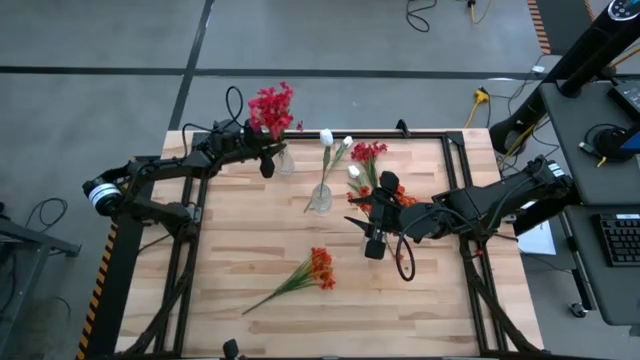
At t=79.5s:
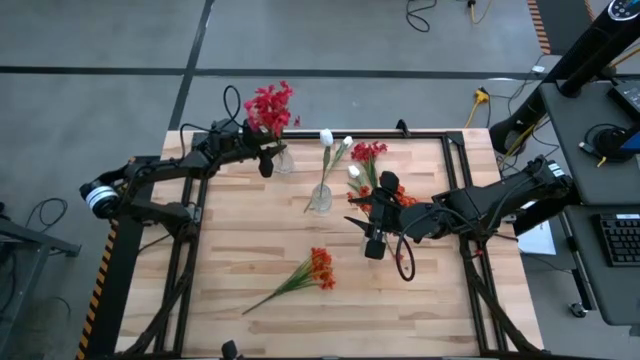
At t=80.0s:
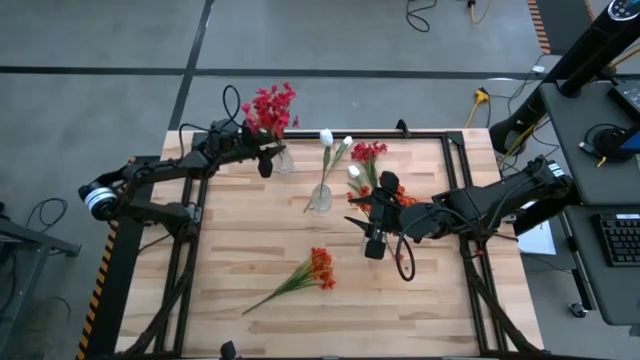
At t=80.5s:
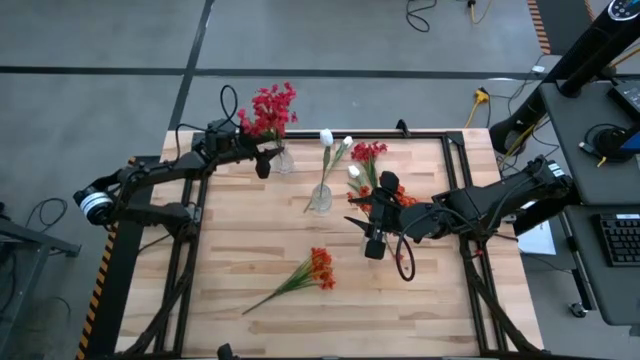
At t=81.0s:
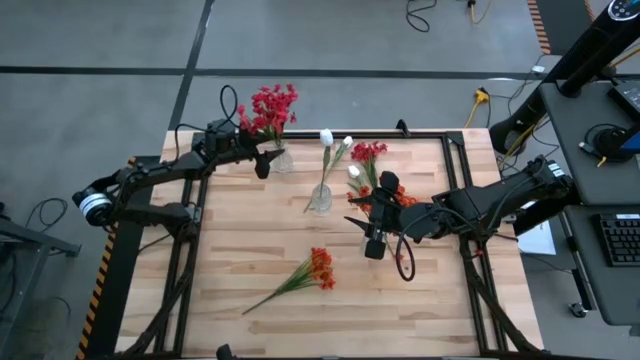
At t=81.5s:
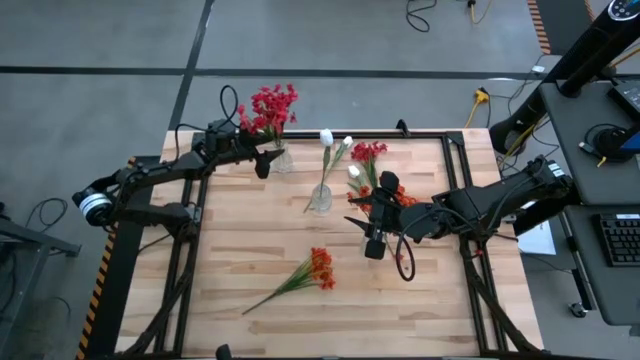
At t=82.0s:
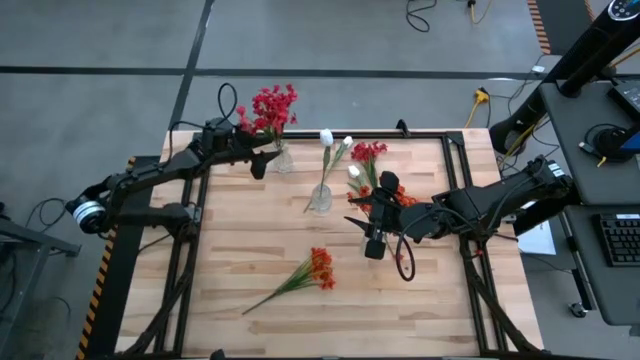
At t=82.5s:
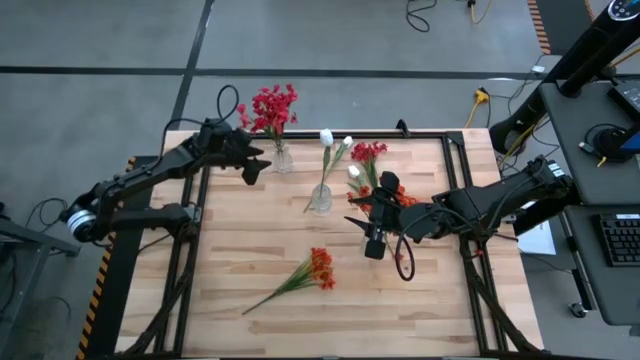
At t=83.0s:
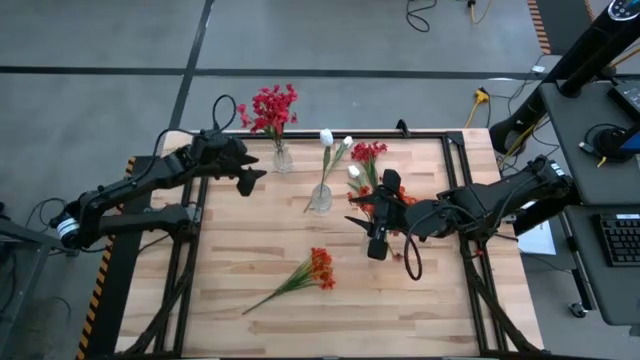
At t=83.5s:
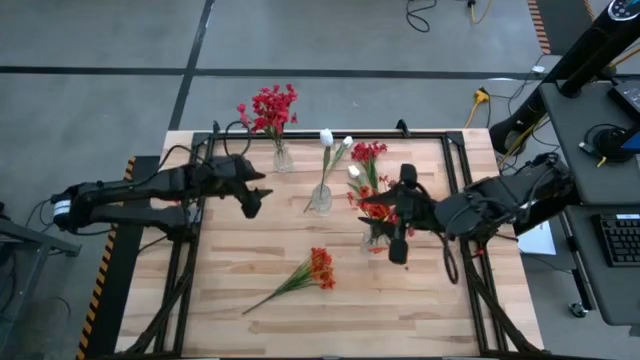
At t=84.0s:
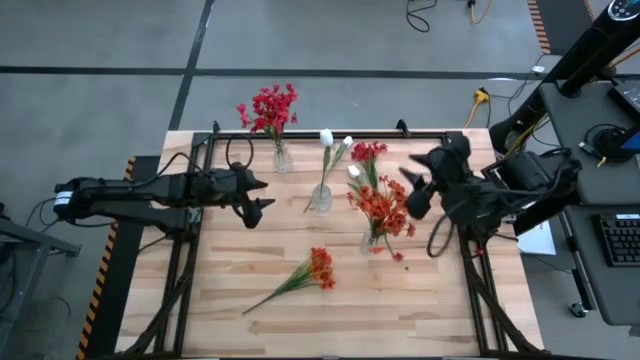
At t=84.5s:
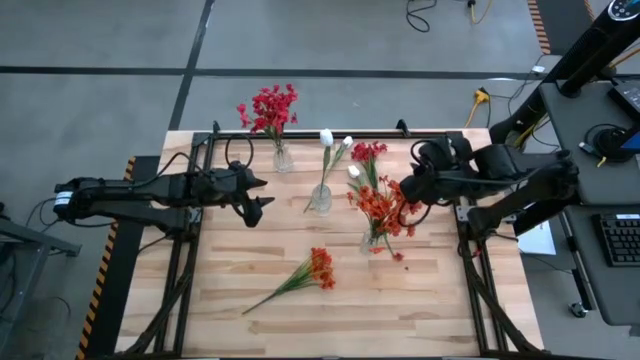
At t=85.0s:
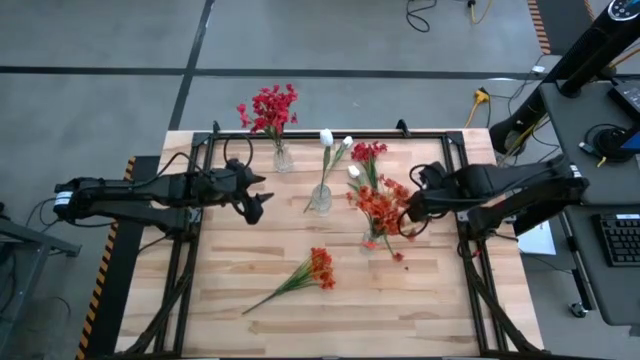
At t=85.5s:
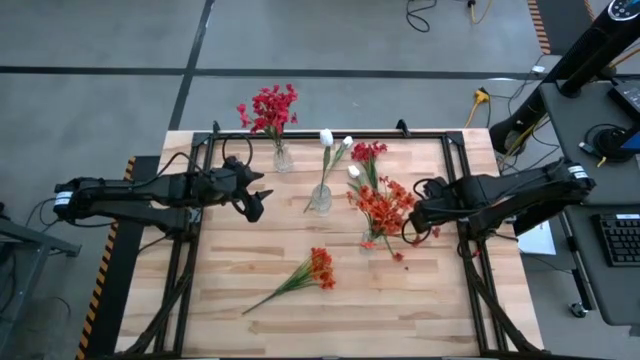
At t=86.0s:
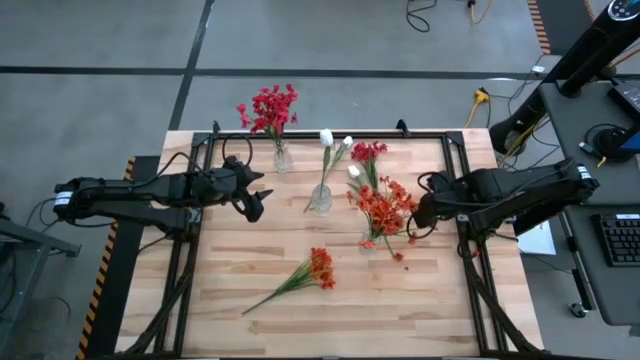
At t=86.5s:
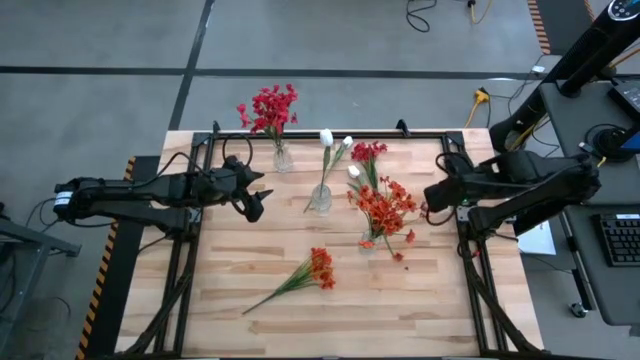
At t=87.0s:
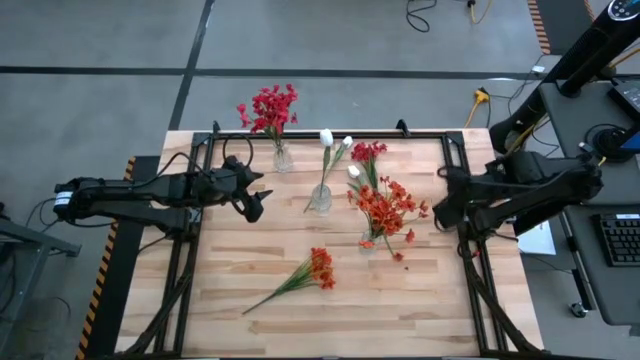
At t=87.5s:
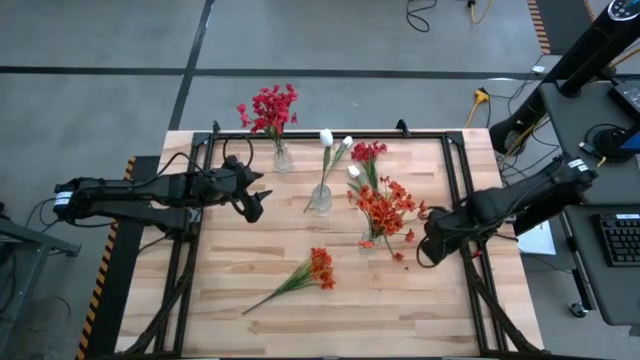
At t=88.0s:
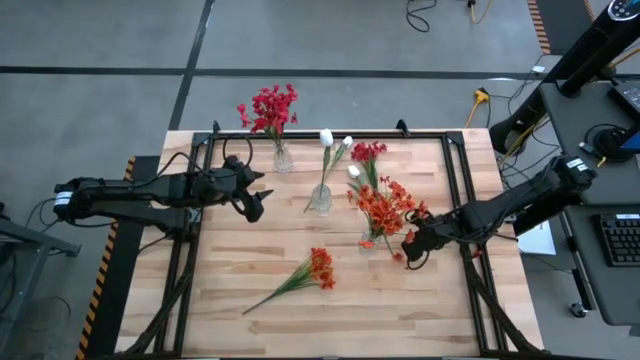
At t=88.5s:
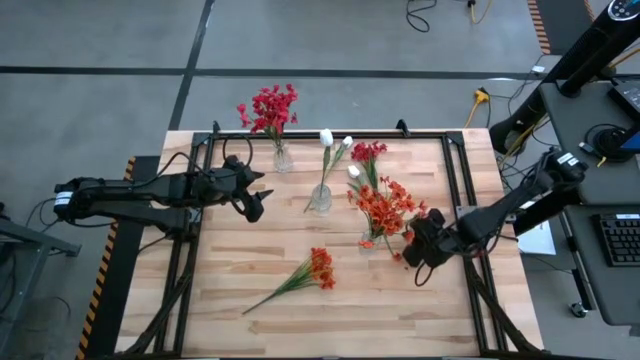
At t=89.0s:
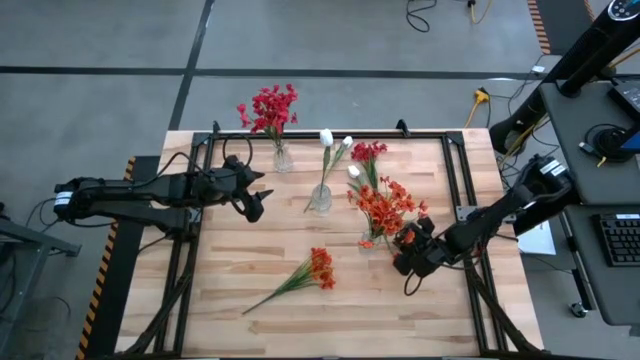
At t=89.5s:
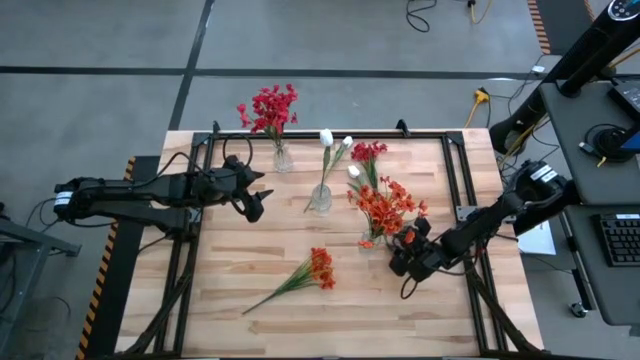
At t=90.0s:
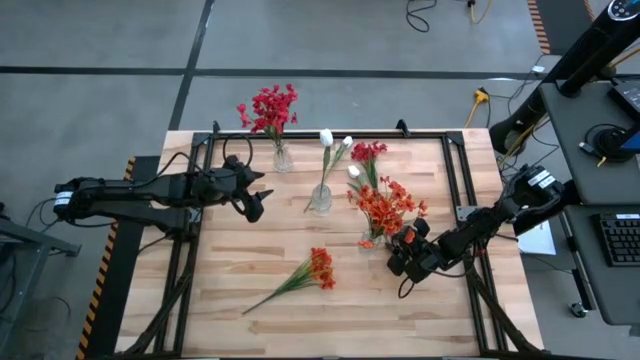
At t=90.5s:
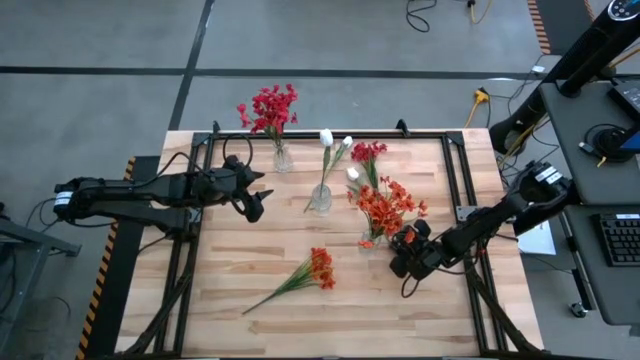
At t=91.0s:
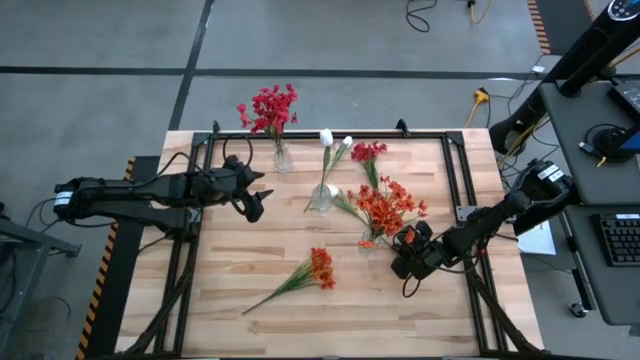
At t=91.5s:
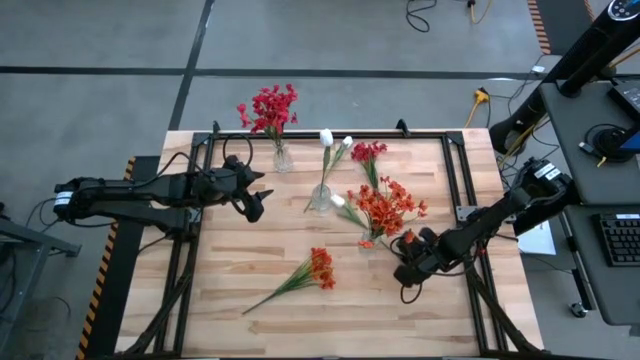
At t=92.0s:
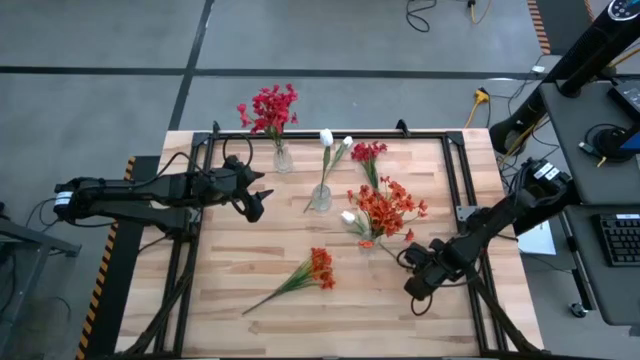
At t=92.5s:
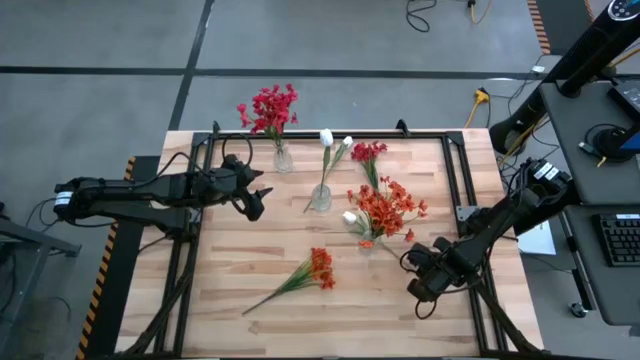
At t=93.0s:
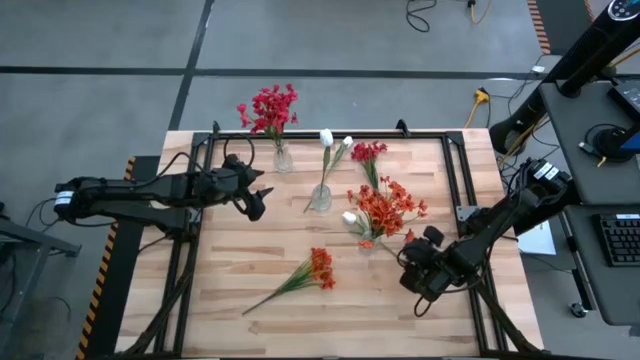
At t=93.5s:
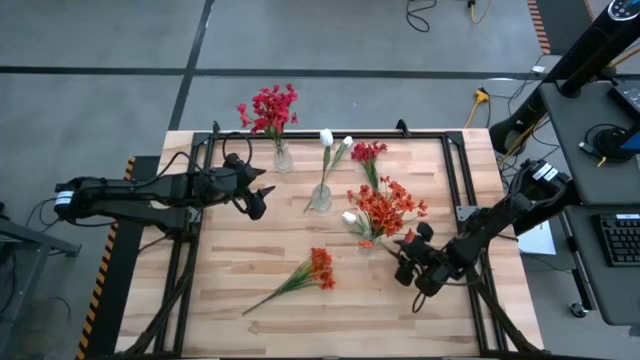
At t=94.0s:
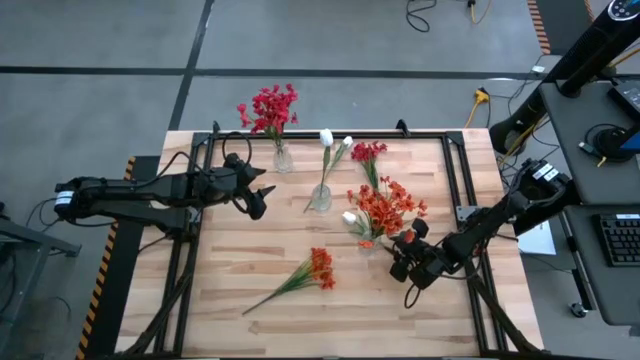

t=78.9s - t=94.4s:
Task: Sort flowers into vase by color
Put the right white tulip flower into the center transparent glass vase

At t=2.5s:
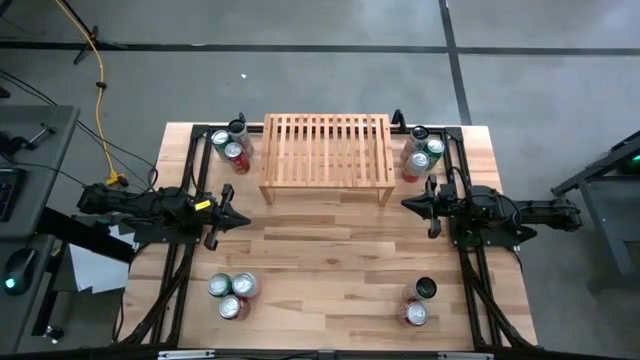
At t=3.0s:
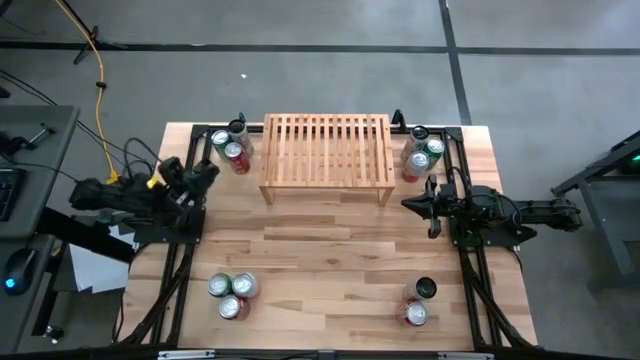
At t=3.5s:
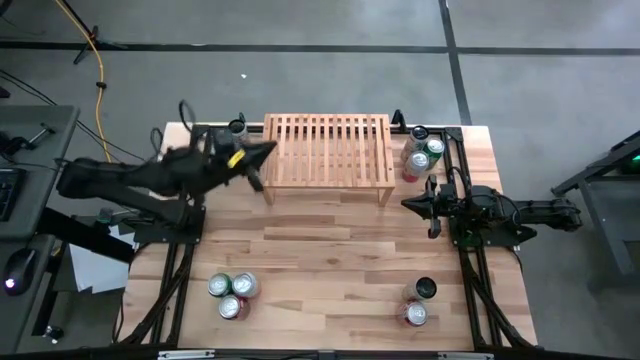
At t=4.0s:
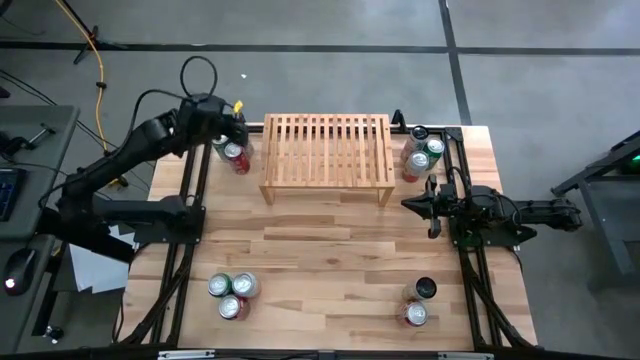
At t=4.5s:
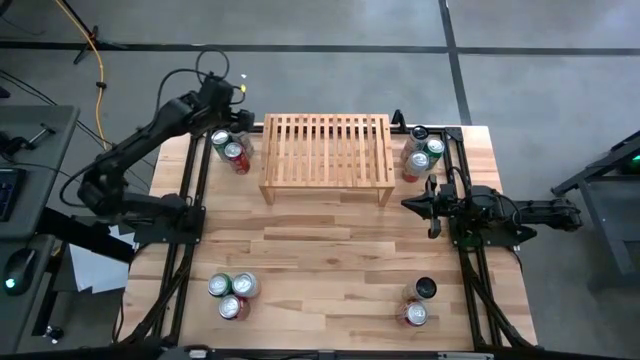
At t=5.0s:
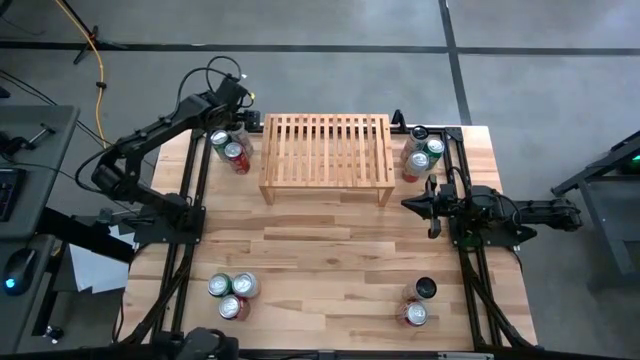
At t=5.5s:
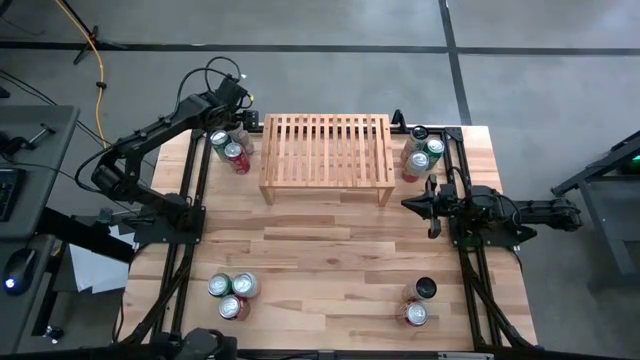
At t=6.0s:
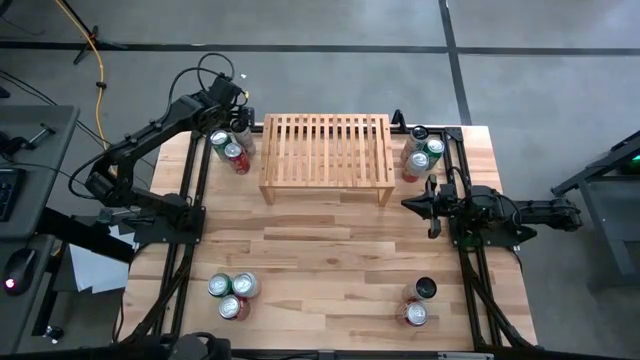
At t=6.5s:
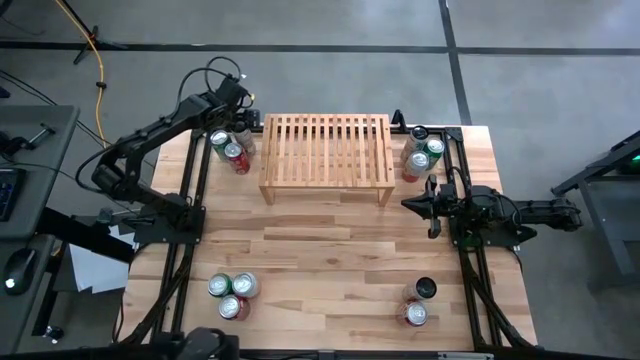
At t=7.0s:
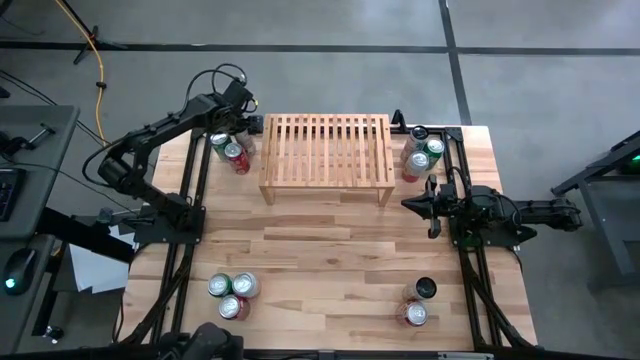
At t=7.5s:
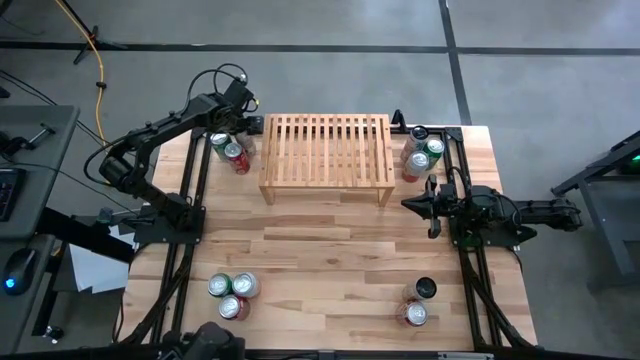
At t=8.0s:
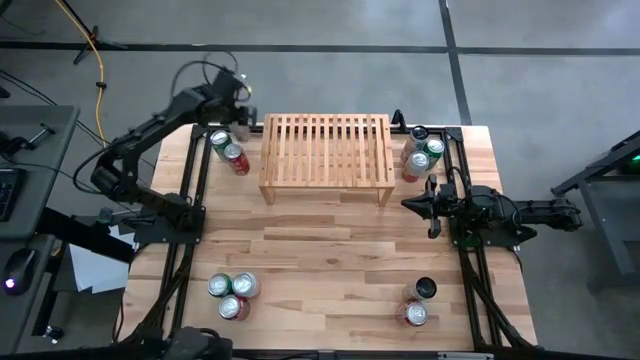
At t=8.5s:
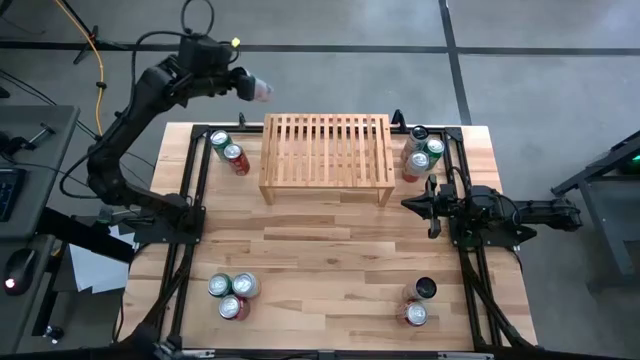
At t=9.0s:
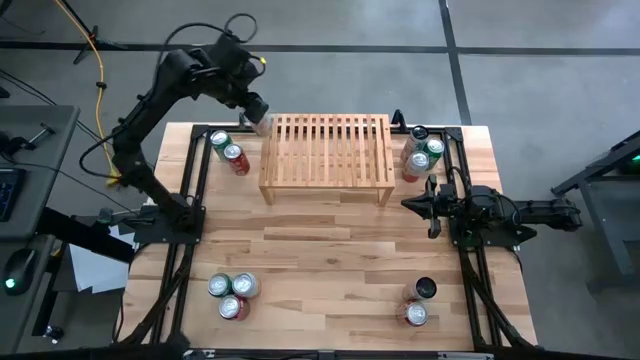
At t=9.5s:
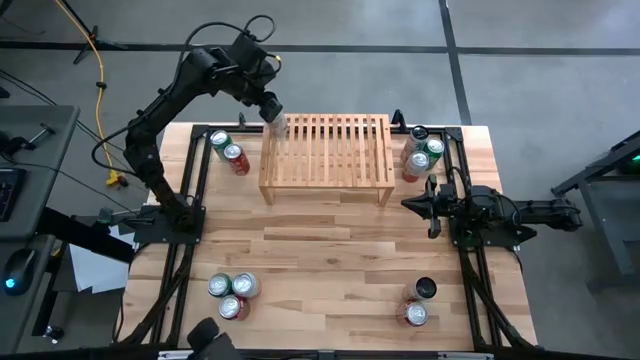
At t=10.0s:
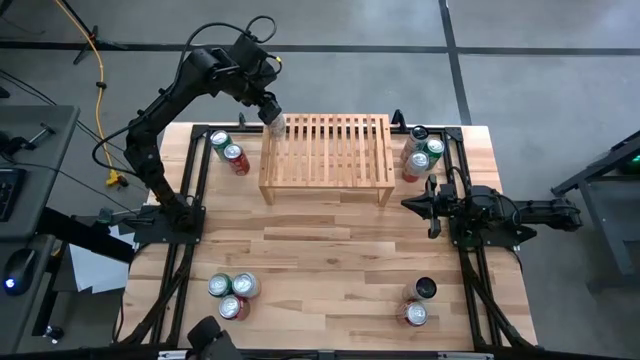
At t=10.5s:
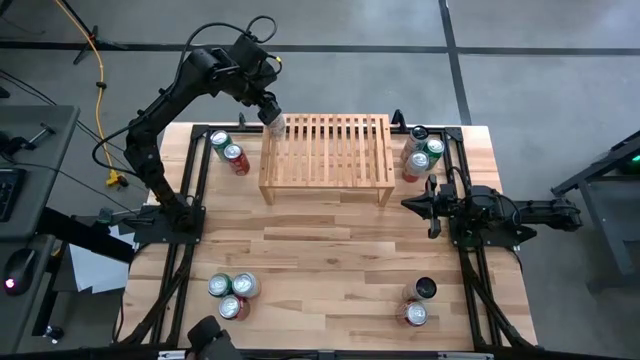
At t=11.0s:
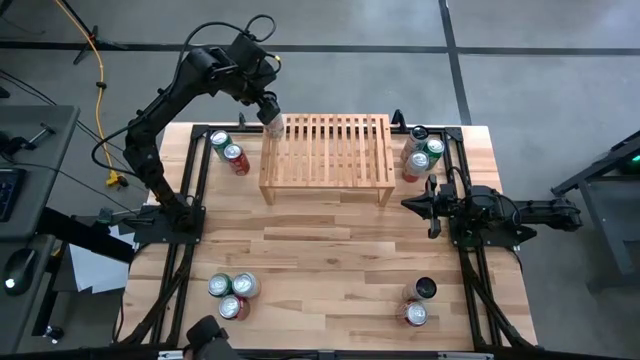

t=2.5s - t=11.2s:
Task: Place canned beverage on shelf
Put the top left white-pink soda can on the shelf
